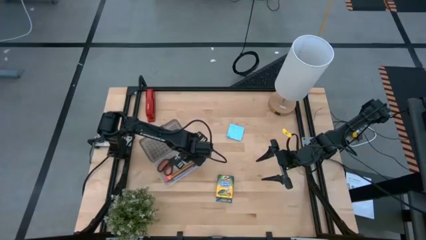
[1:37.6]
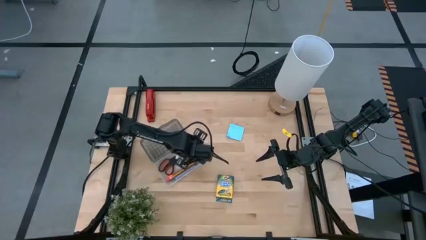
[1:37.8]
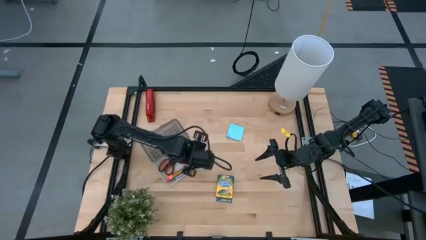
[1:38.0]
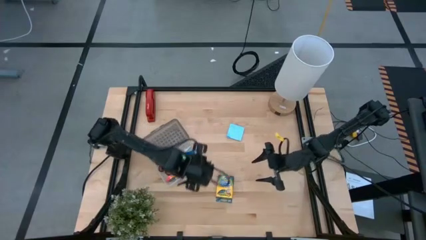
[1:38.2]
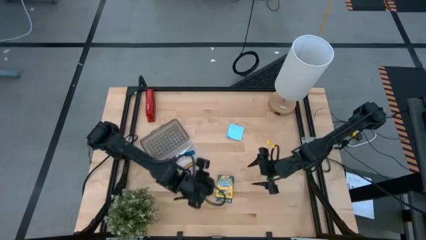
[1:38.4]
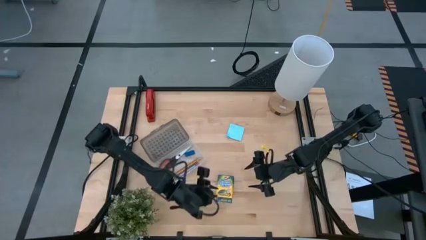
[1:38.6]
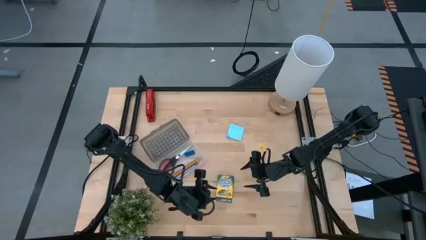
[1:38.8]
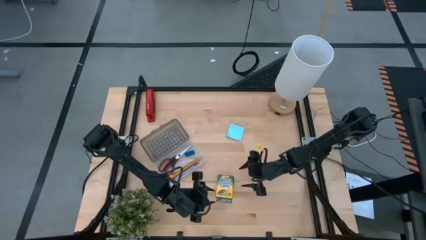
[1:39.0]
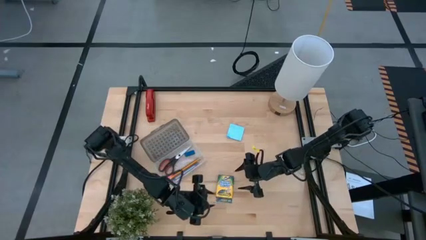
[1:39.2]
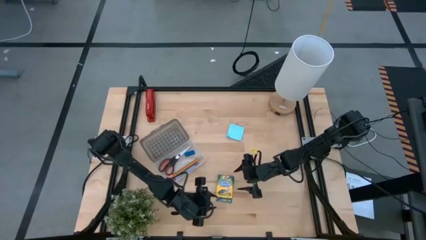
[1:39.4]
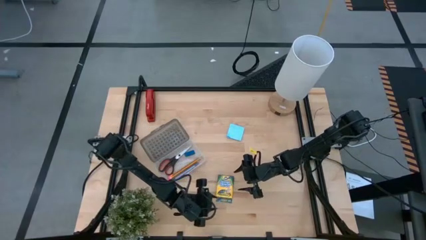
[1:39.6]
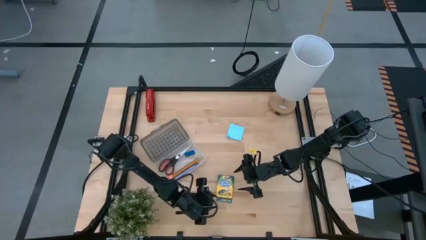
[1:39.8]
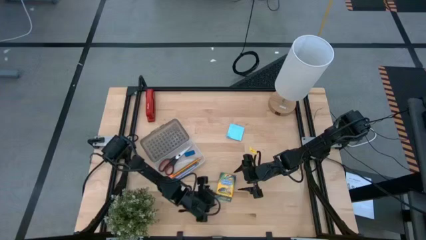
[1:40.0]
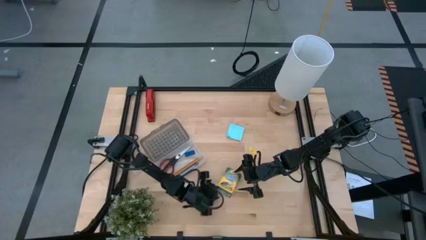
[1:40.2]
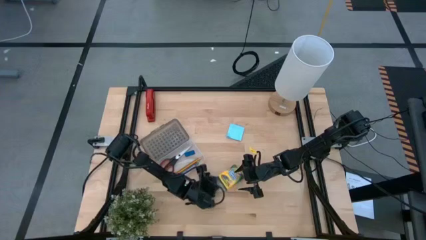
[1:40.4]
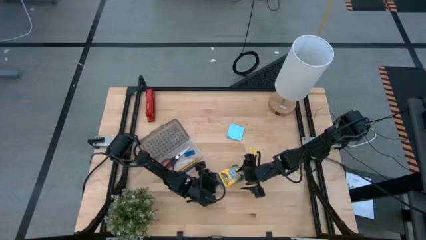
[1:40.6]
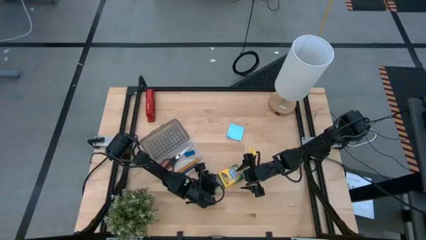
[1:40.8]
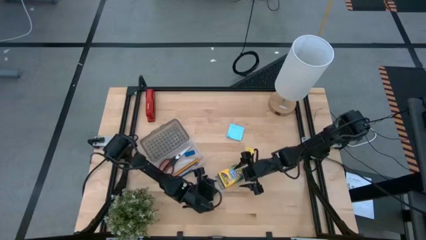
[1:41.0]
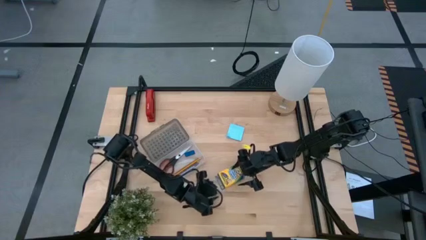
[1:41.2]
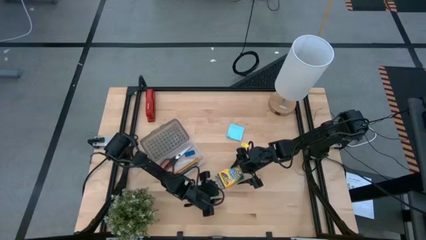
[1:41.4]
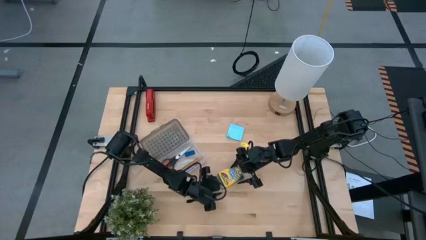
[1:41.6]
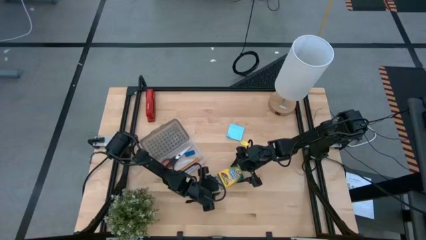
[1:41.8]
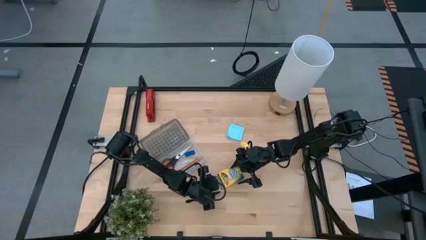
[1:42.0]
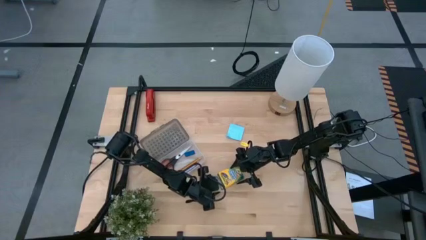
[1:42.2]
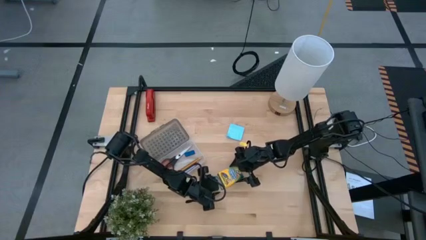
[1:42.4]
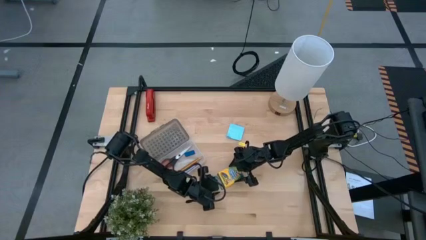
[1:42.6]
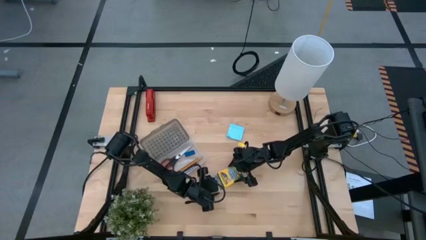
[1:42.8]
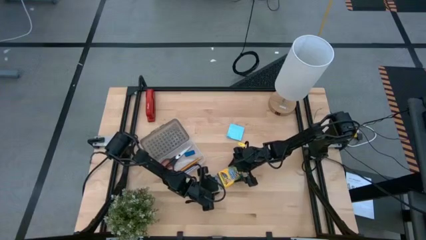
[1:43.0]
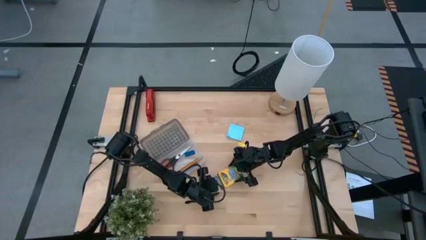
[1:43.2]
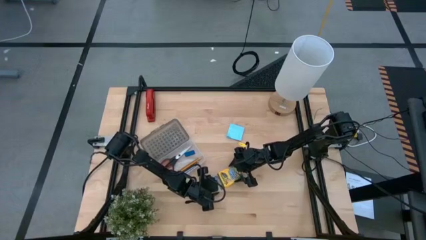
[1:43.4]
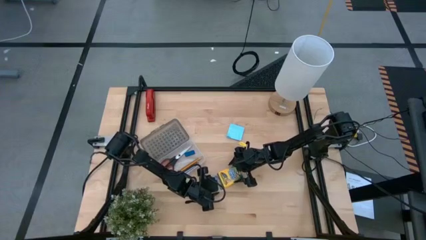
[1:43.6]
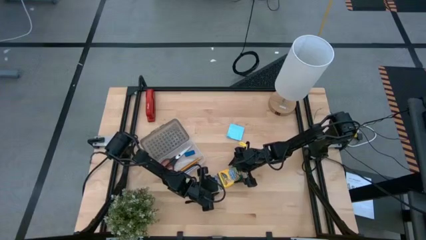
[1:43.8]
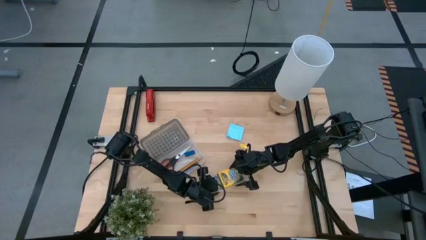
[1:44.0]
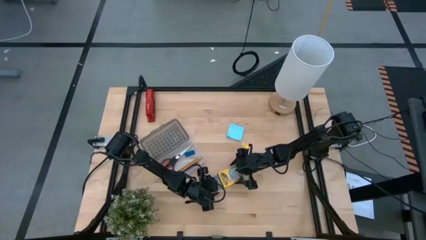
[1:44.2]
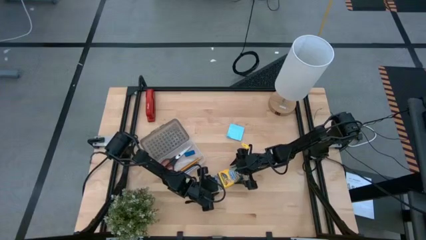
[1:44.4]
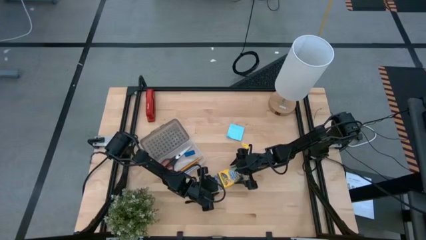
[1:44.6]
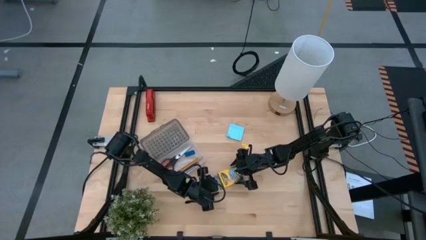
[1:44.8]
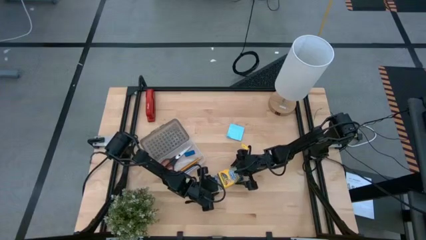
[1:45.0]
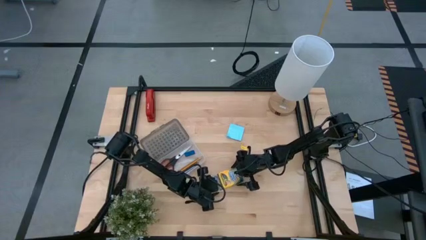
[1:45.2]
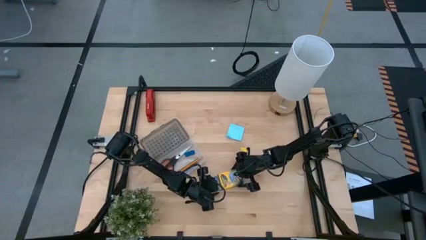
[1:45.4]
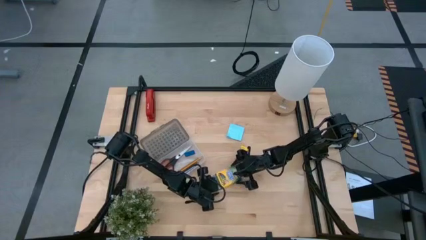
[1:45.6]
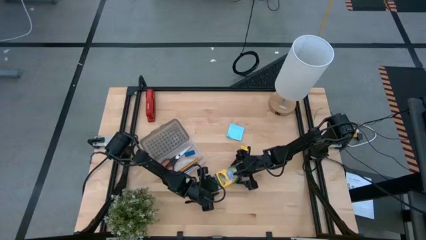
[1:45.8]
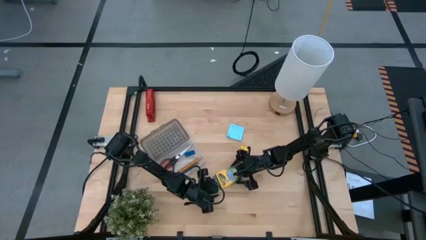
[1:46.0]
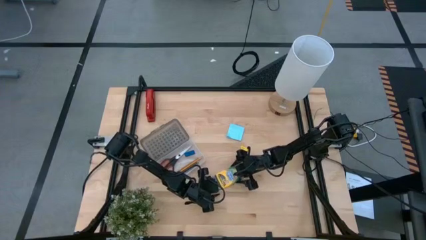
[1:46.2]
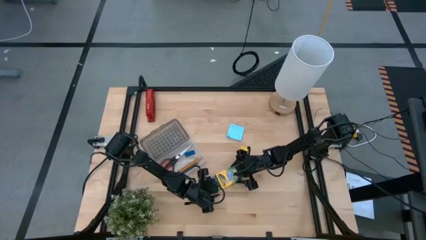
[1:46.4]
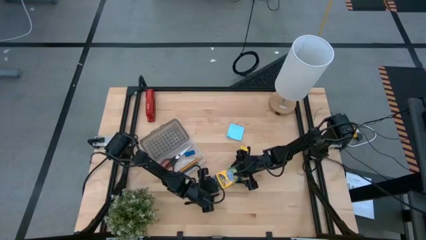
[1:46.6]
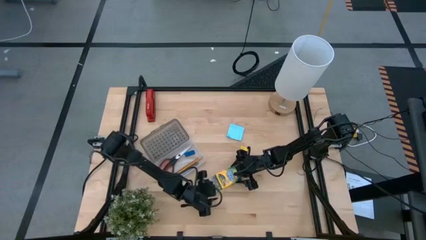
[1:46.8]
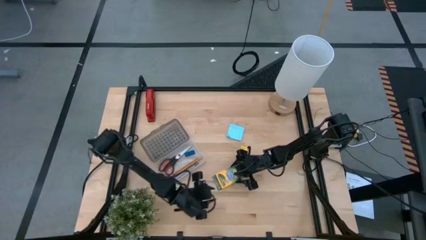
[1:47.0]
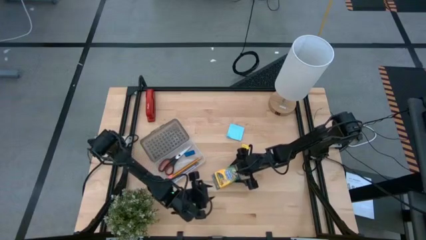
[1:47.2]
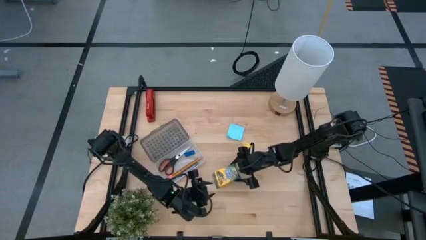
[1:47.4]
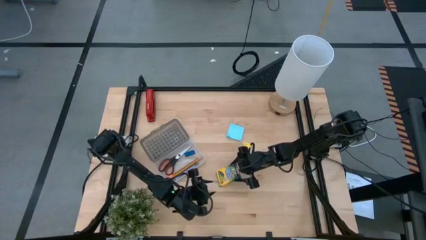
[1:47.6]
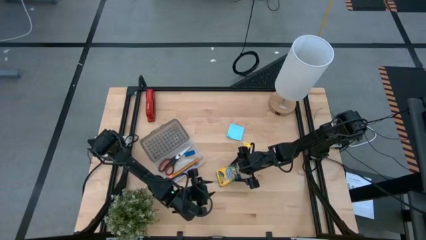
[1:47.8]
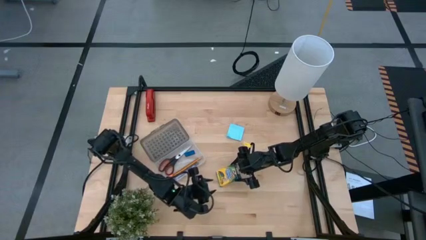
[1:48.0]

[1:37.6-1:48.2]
Task: Pack school essentials
Put the yellow crayon box into the supply box

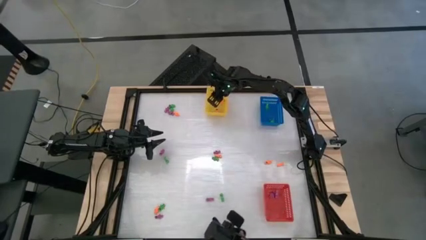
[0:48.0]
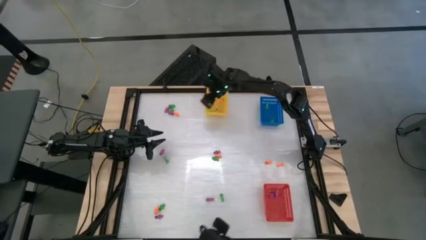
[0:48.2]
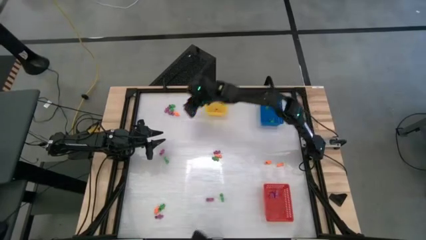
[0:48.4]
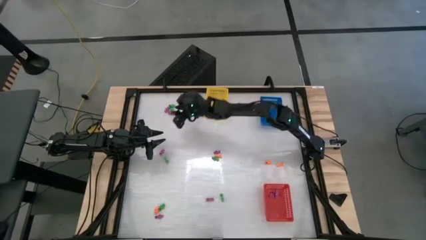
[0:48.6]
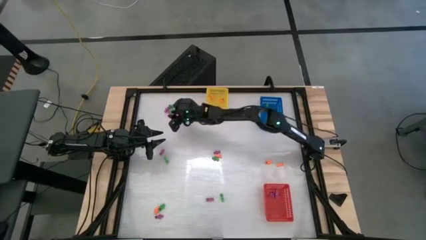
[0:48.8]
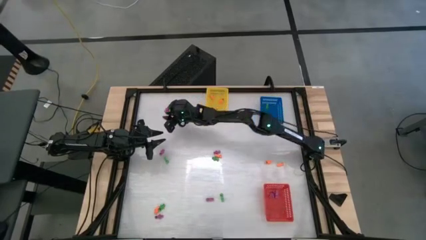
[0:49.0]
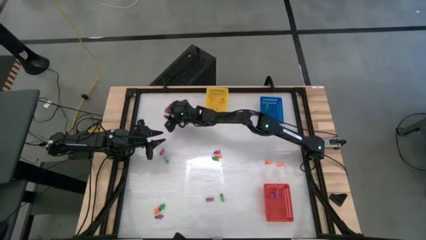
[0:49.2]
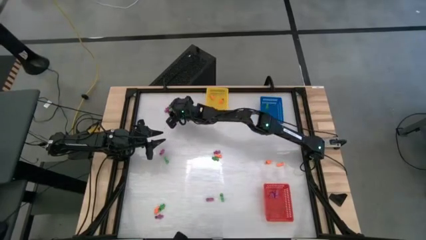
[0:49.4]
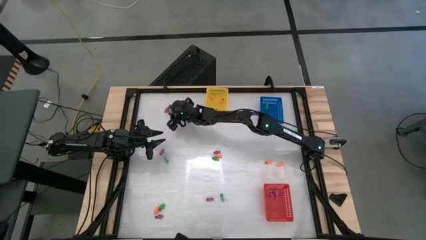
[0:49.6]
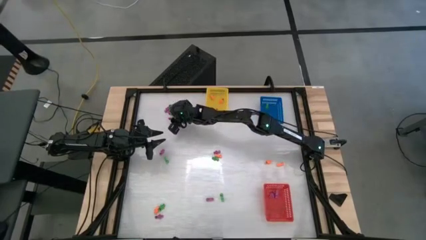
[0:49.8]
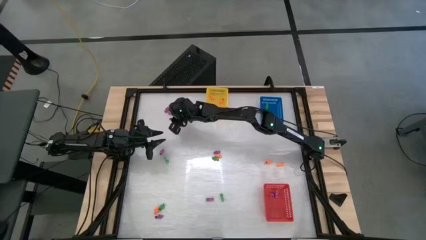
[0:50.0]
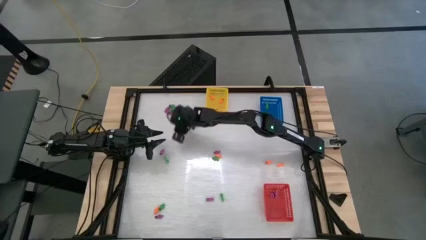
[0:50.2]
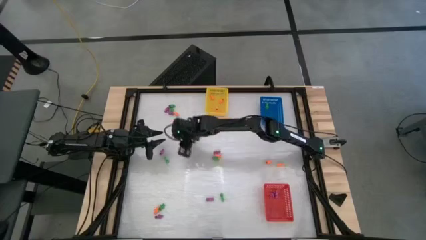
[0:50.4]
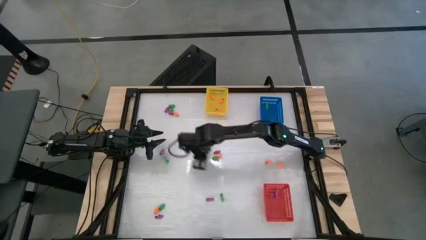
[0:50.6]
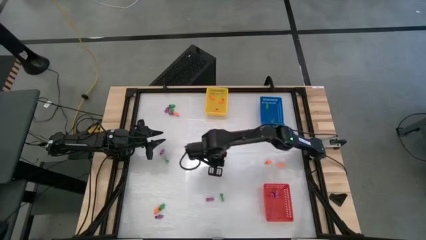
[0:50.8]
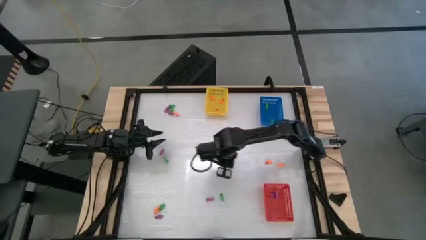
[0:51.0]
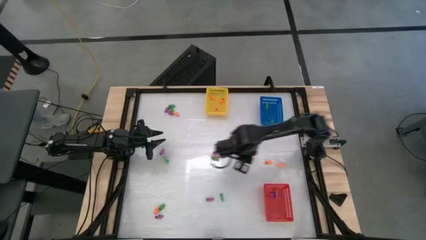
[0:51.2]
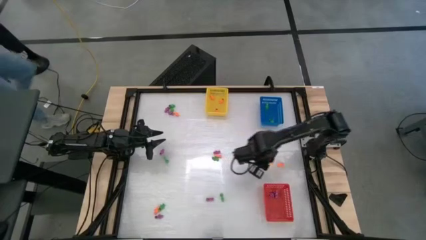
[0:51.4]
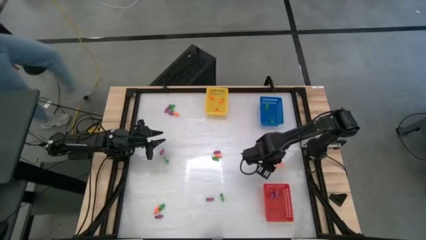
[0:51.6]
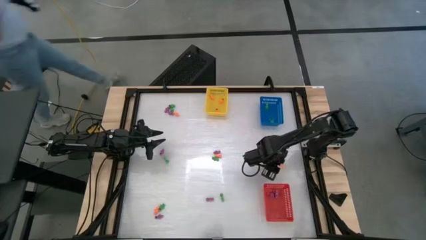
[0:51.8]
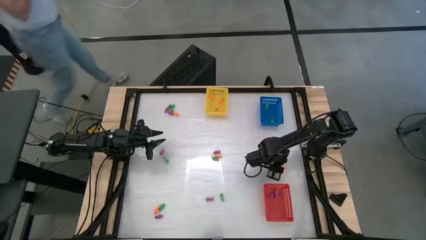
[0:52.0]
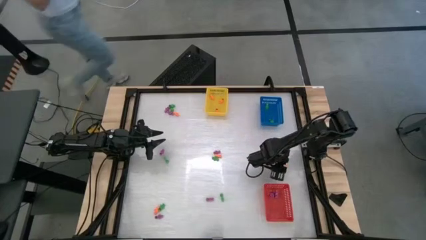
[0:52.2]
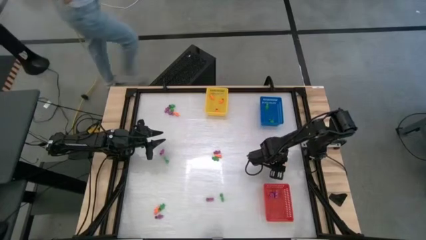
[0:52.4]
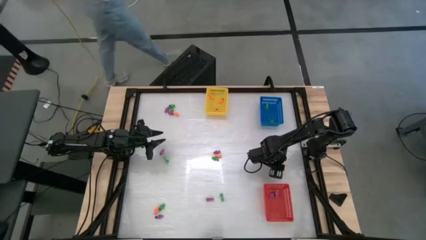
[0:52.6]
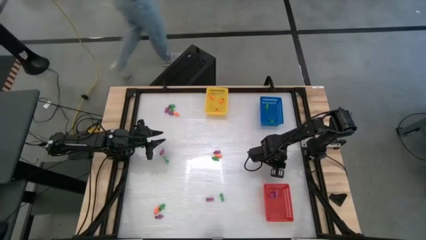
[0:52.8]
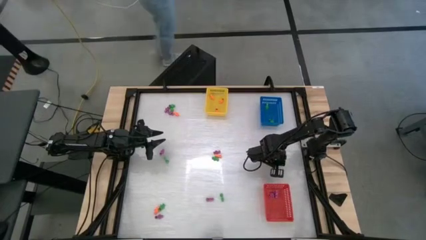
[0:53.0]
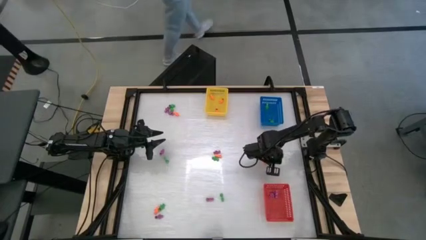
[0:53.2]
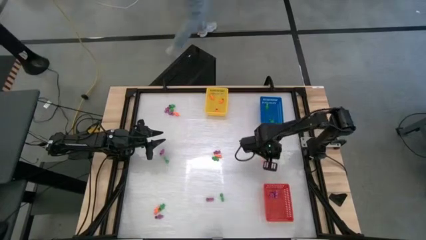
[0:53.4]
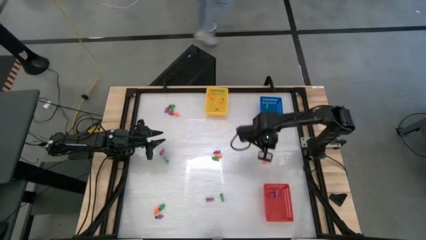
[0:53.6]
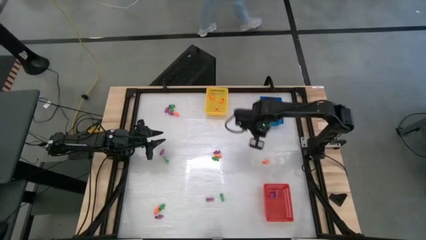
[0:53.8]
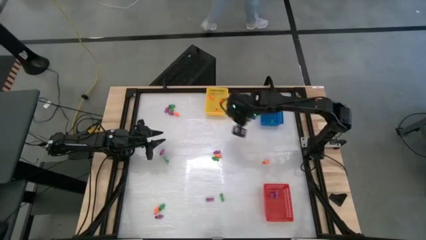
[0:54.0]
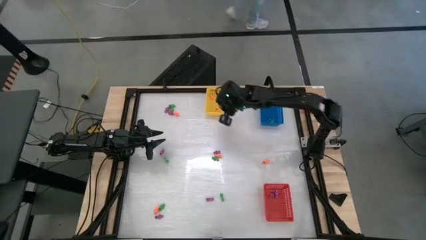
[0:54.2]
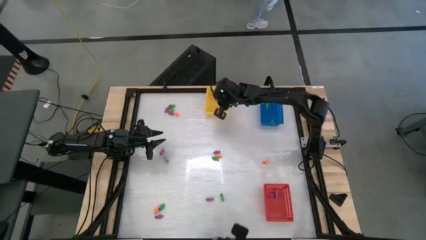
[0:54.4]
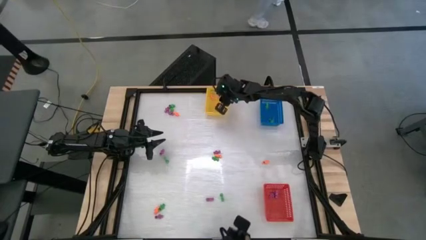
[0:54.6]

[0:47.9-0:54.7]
Task: Sort Halloween decoration
Put the orange skeleton toy into the yellow bin
